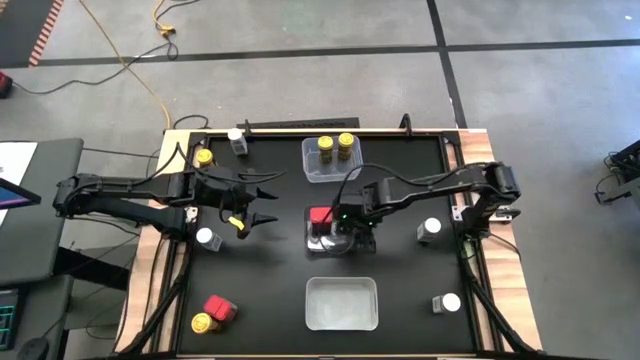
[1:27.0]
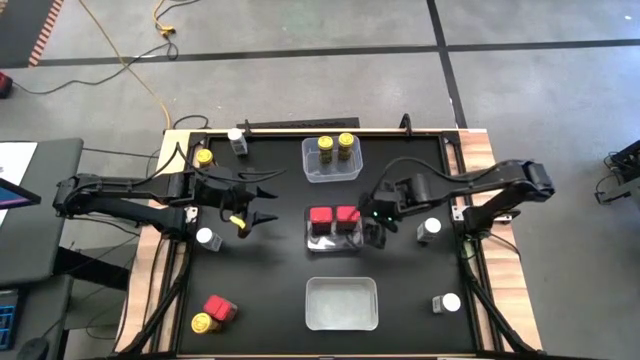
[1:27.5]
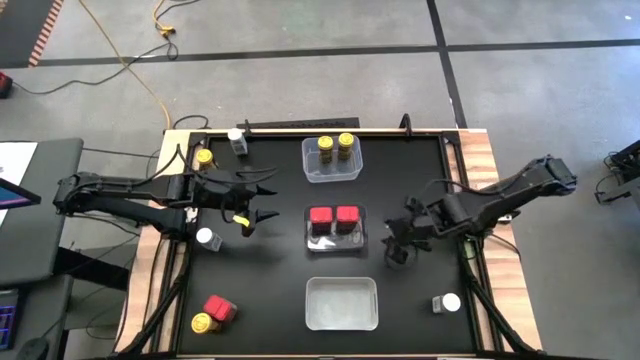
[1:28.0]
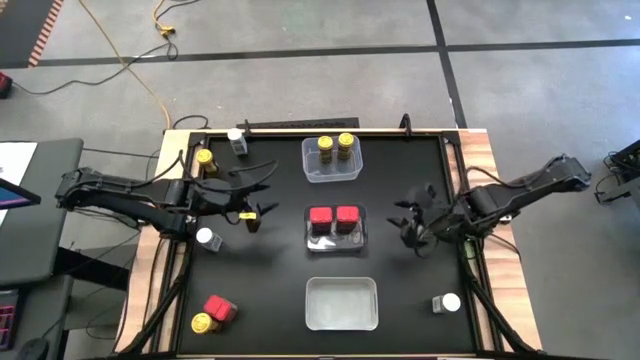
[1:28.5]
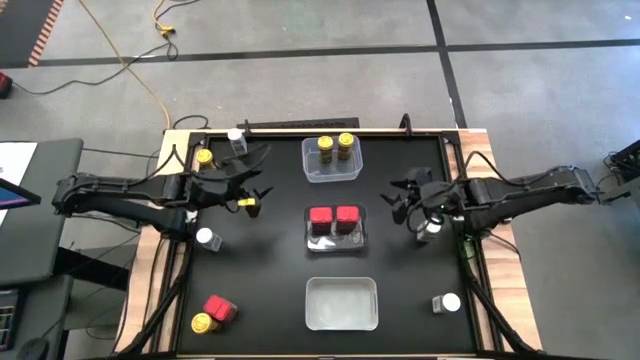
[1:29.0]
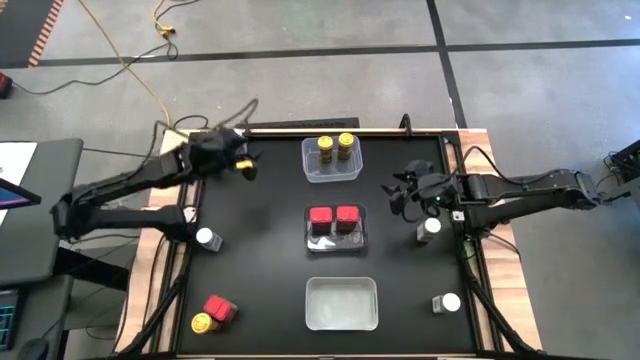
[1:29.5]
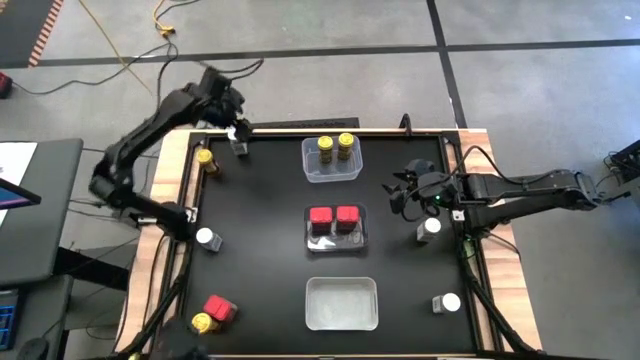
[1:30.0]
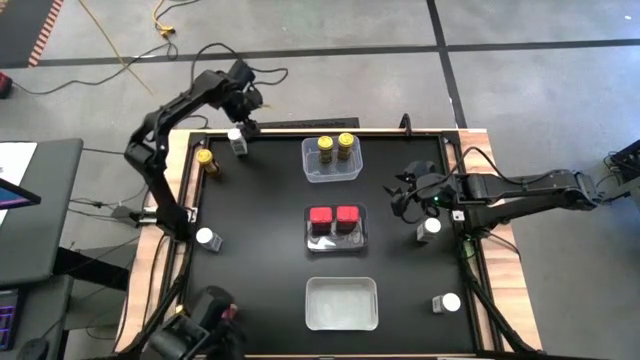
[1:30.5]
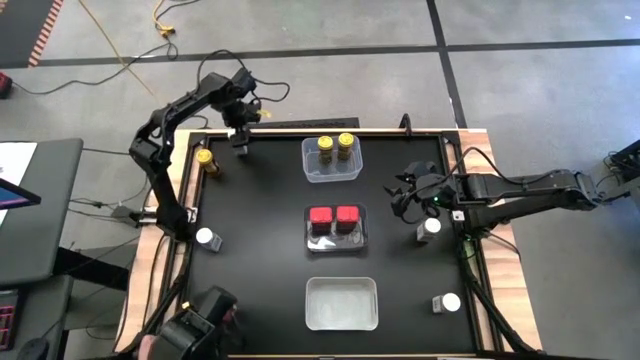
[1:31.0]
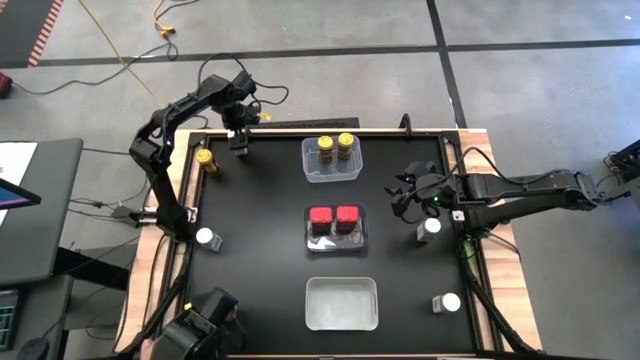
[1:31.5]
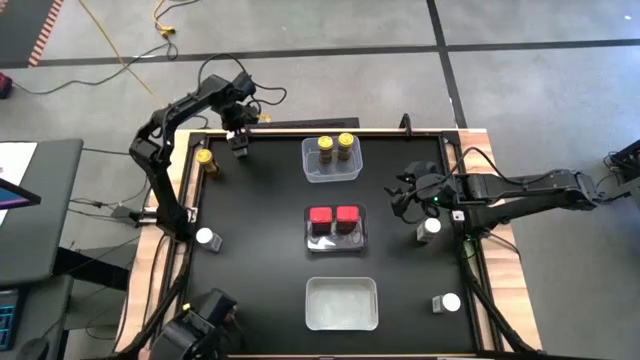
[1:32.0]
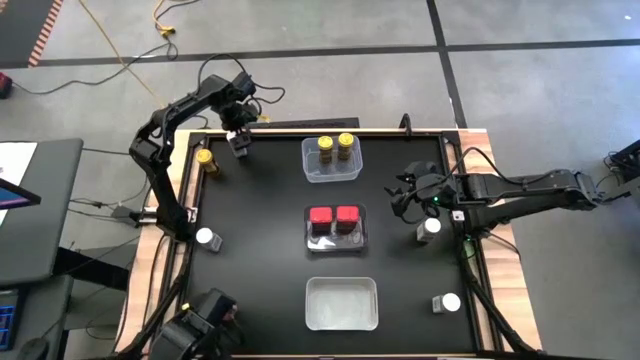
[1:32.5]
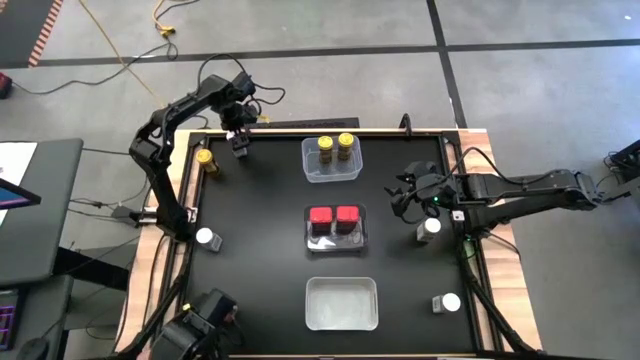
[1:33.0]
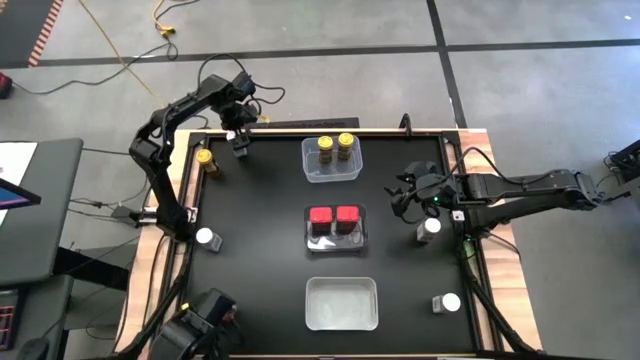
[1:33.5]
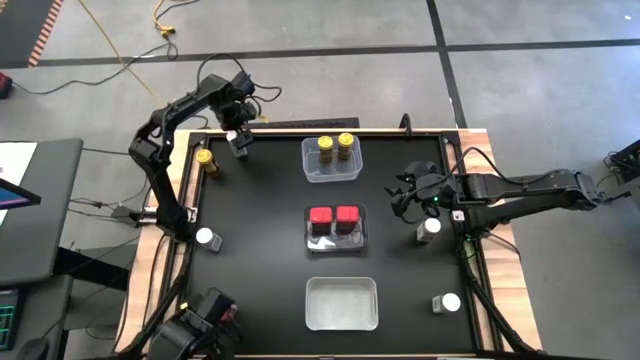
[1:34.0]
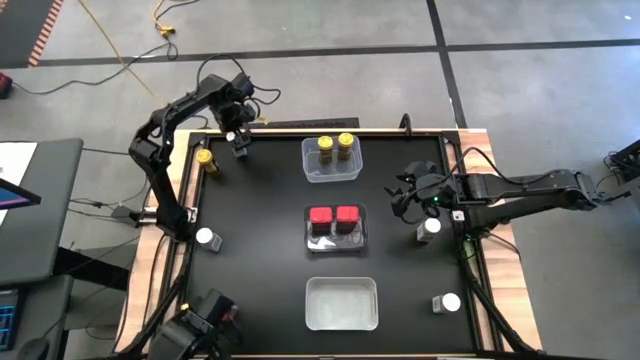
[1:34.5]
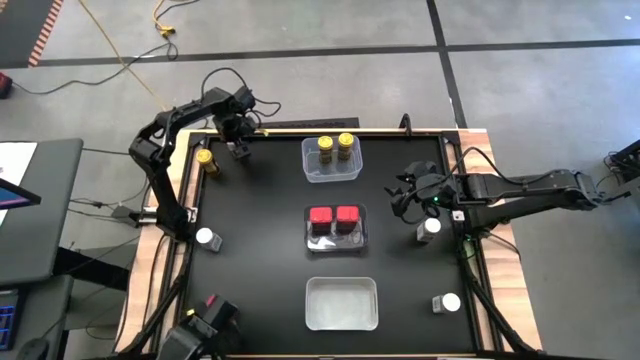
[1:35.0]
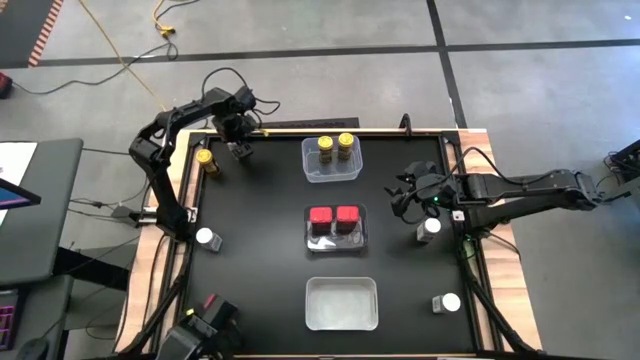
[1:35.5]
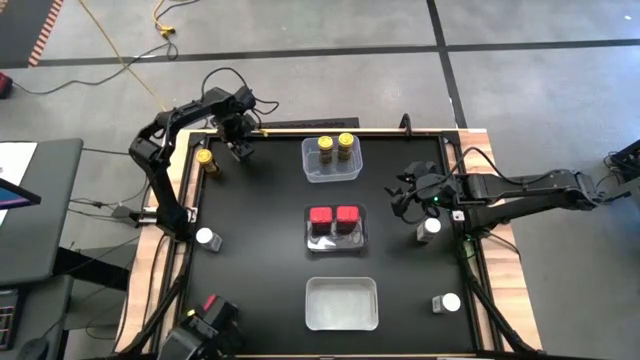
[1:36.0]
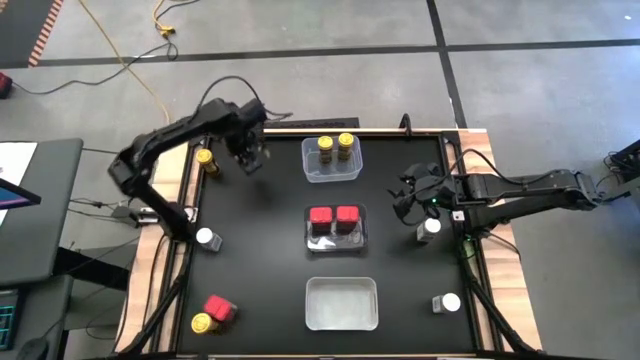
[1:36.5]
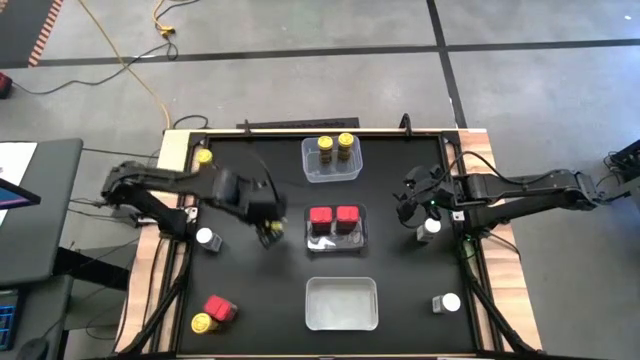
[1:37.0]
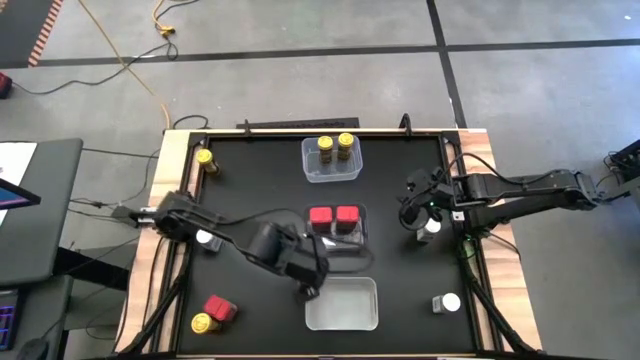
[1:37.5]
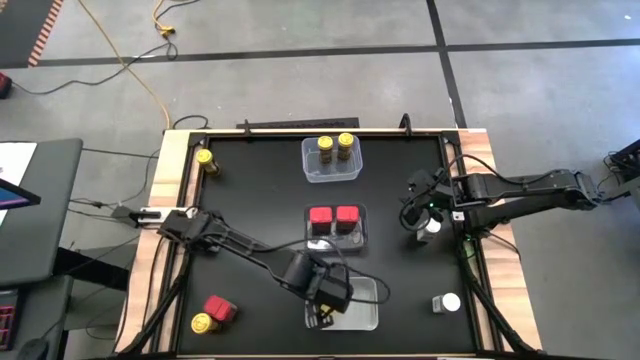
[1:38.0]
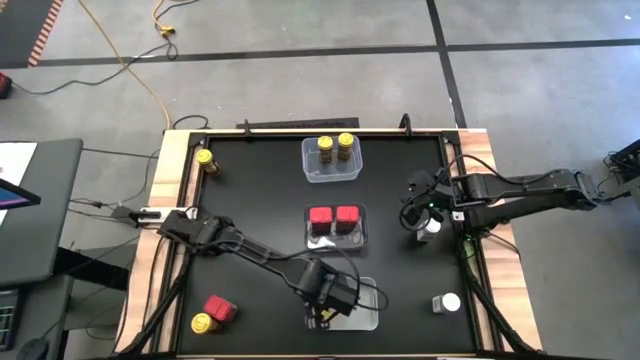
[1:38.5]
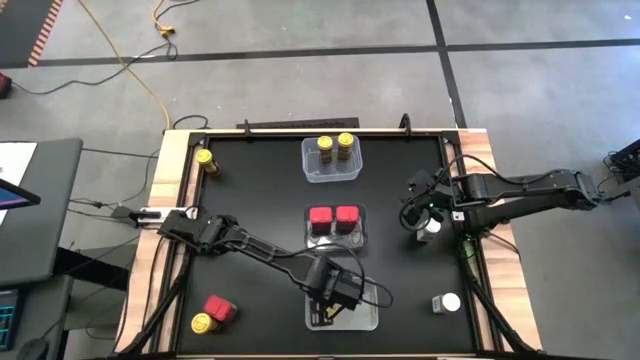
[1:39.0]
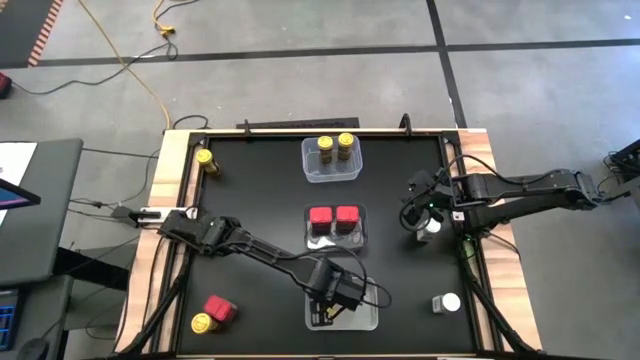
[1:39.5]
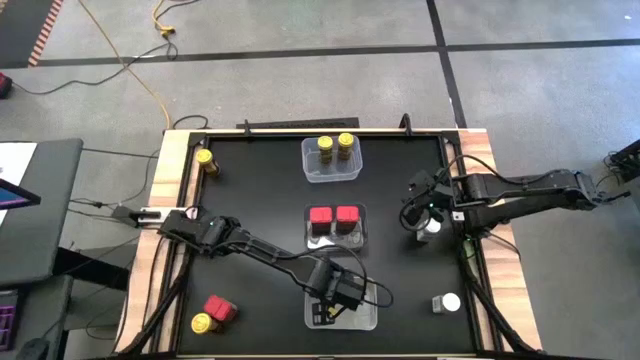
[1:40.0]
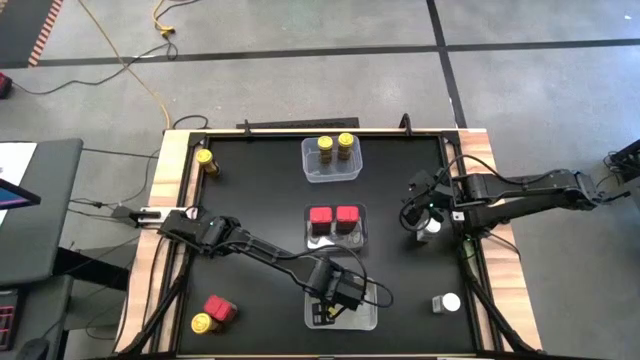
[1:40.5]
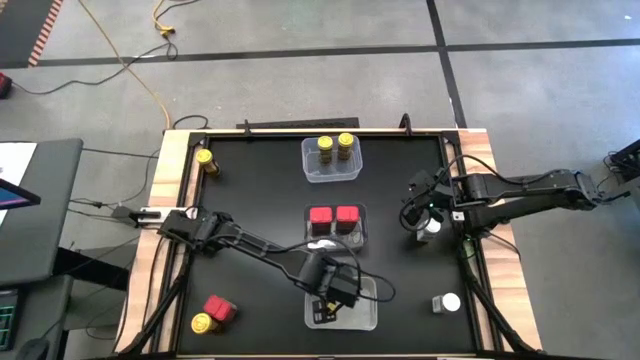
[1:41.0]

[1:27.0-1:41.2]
Task: Sort spices by type
Put the top left white seasoning bottle into the gray bin

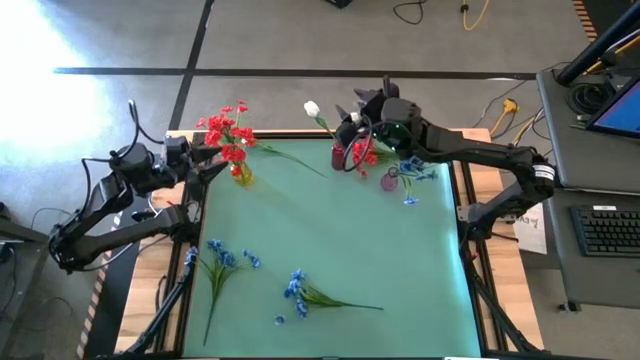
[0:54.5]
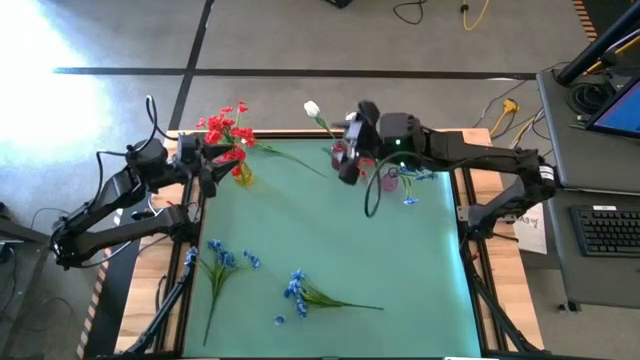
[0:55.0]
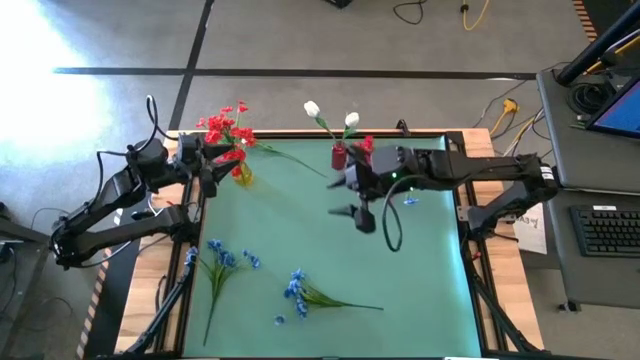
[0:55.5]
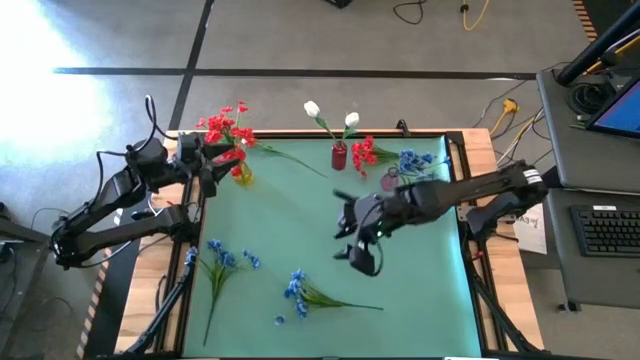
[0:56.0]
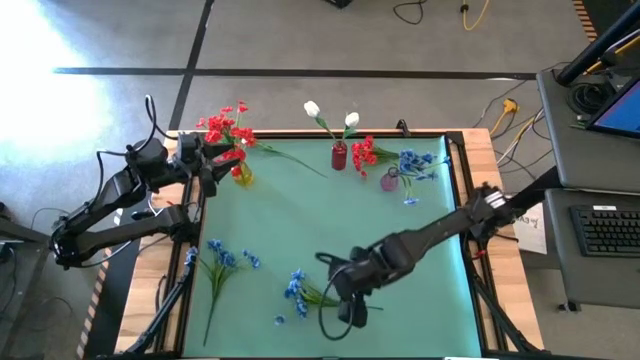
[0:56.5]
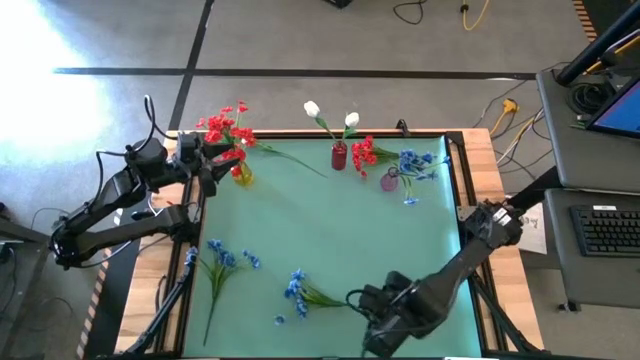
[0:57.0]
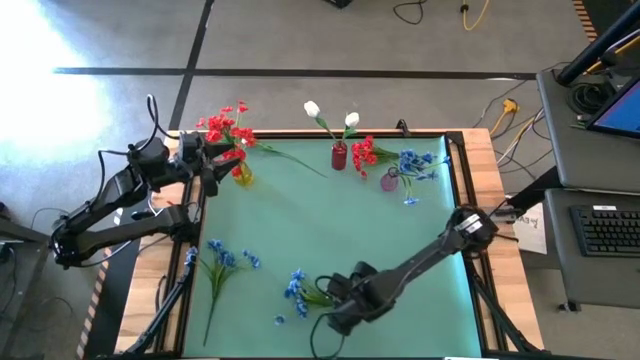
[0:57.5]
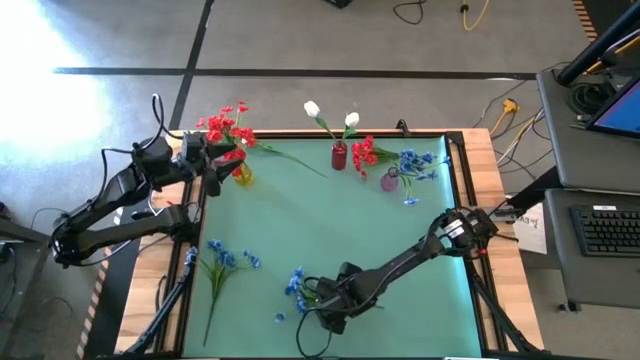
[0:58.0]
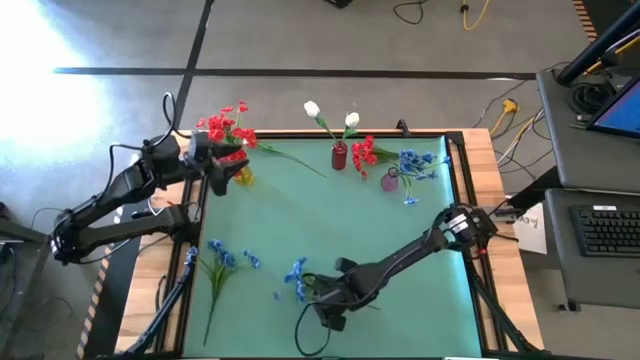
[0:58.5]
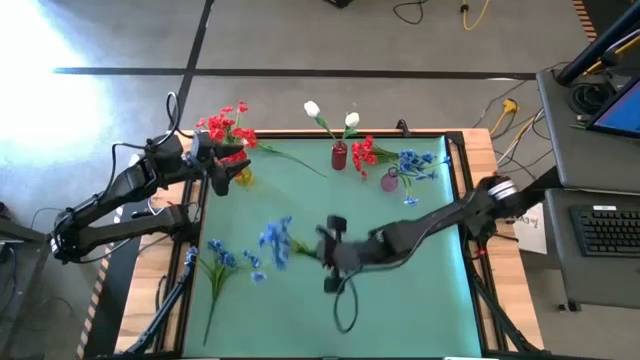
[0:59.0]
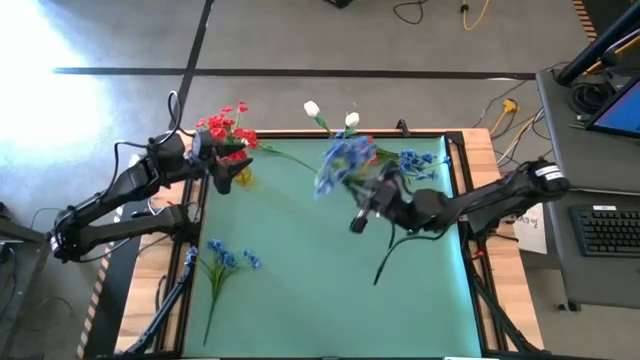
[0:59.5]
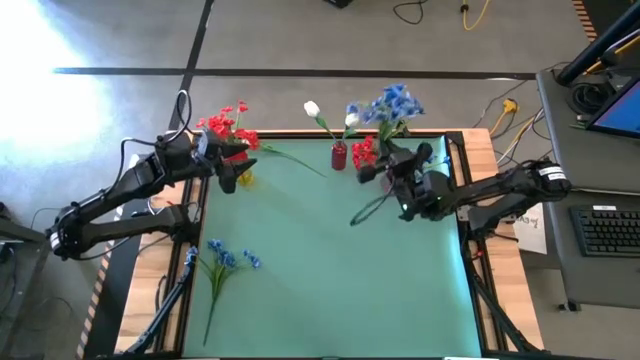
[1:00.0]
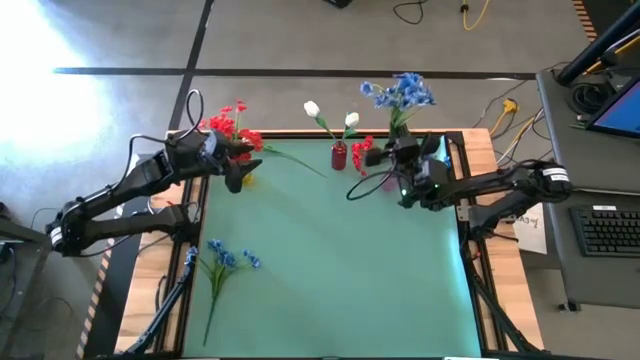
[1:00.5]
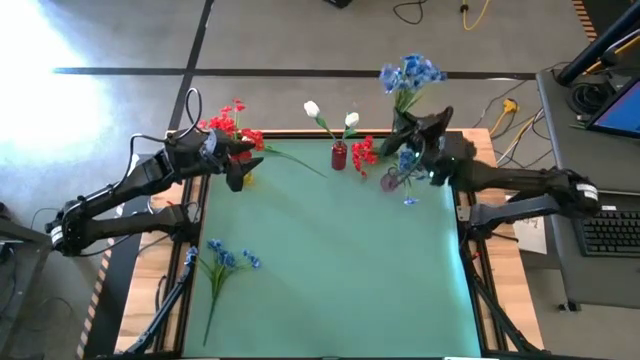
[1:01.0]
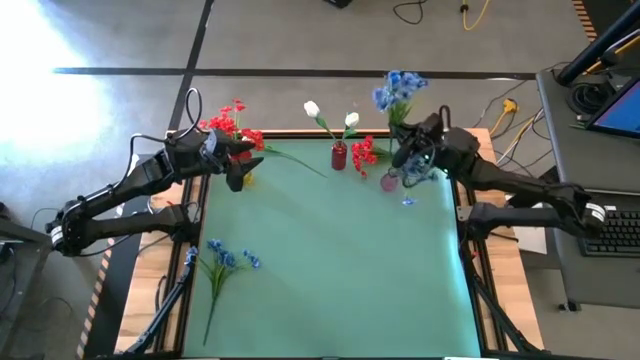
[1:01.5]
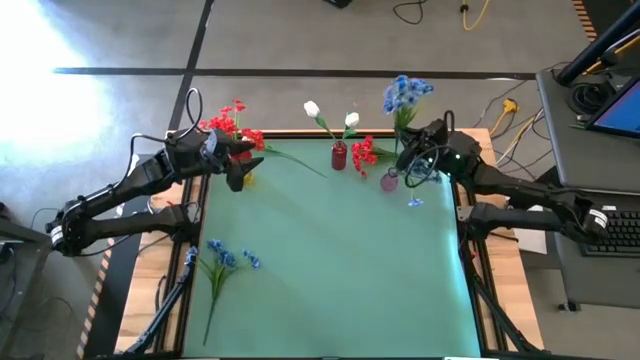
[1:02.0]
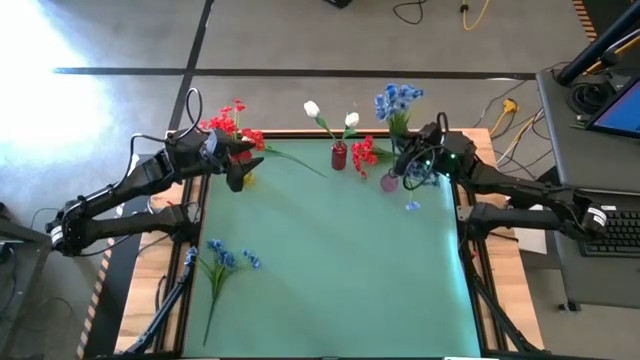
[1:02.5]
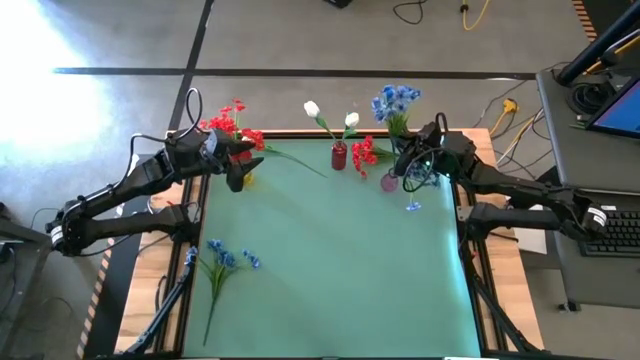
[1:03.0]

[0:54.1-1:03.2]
Task: Sort flowers into vase by color
Put the right blue flower into the violet vase
